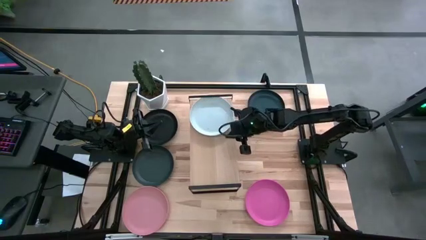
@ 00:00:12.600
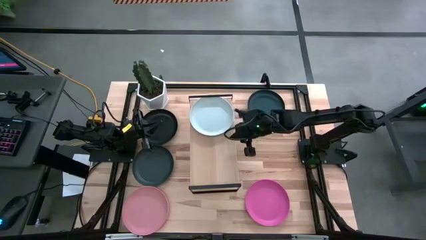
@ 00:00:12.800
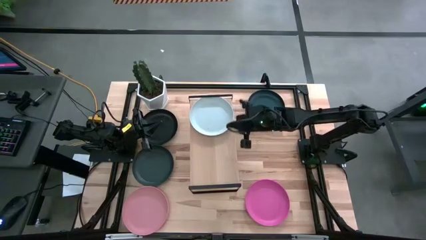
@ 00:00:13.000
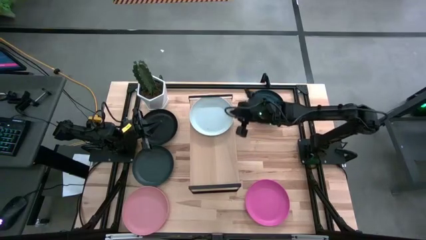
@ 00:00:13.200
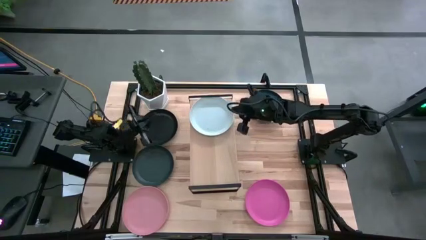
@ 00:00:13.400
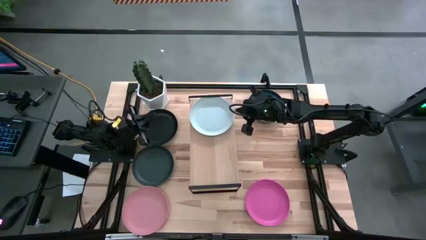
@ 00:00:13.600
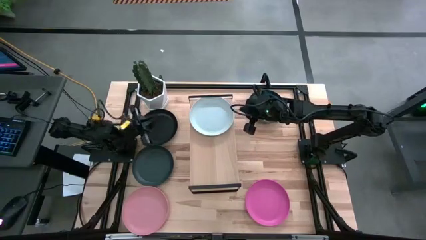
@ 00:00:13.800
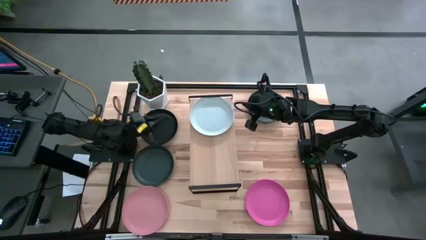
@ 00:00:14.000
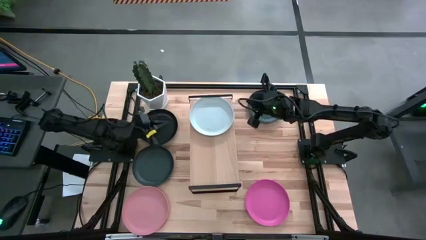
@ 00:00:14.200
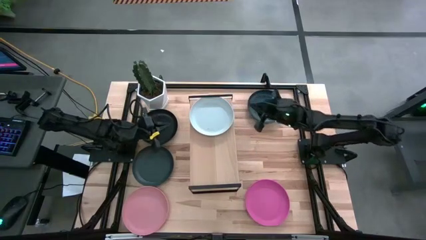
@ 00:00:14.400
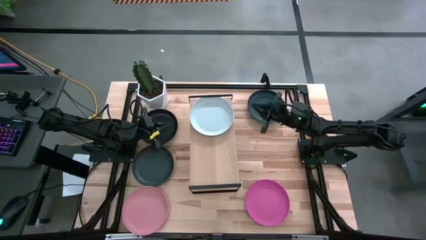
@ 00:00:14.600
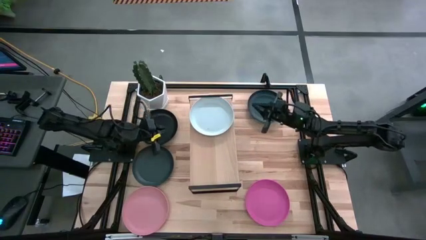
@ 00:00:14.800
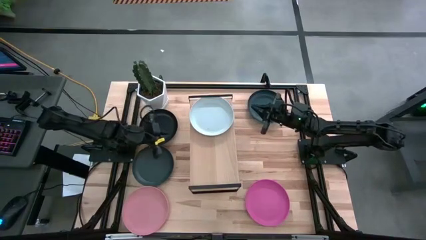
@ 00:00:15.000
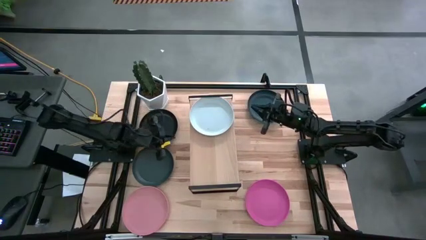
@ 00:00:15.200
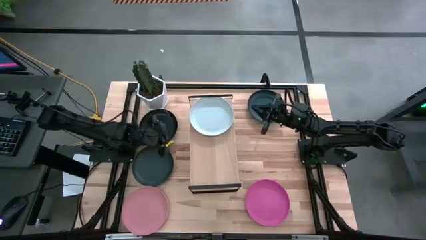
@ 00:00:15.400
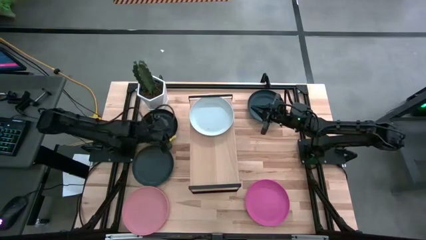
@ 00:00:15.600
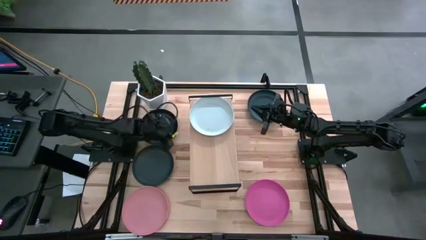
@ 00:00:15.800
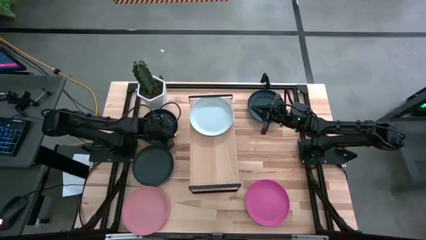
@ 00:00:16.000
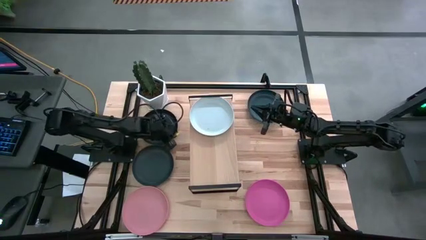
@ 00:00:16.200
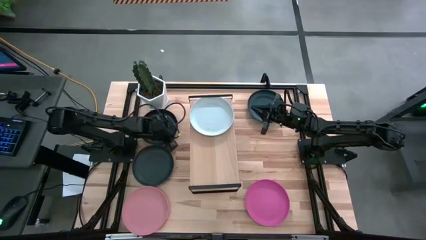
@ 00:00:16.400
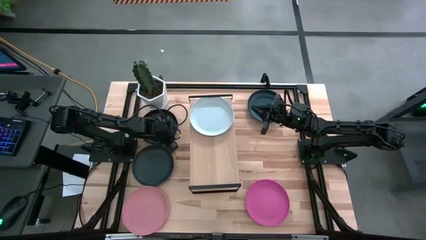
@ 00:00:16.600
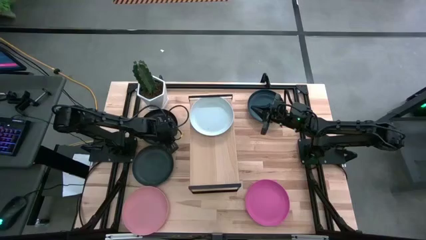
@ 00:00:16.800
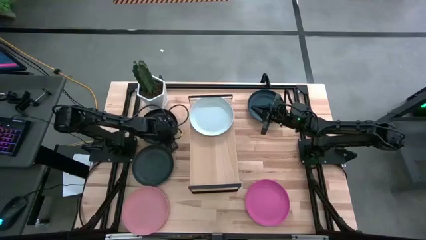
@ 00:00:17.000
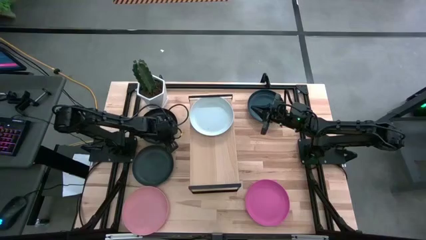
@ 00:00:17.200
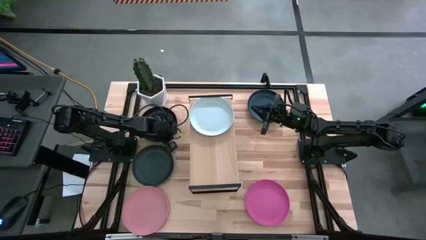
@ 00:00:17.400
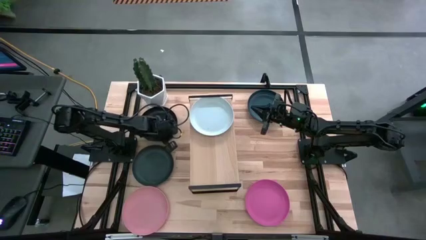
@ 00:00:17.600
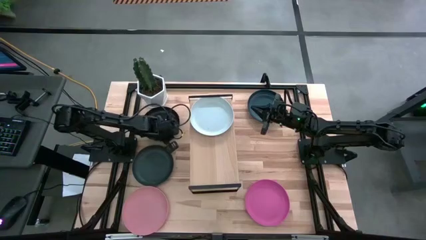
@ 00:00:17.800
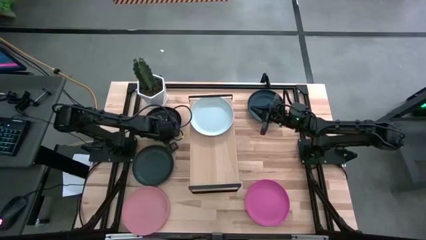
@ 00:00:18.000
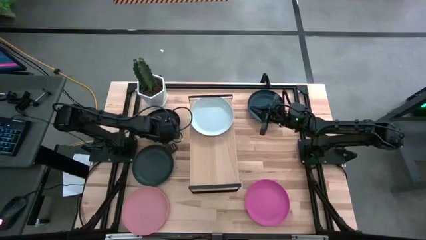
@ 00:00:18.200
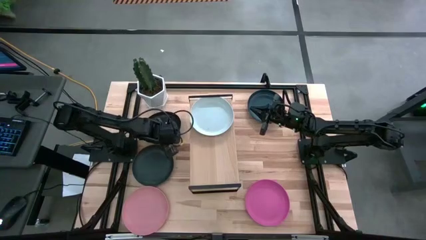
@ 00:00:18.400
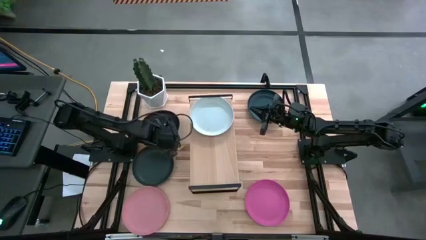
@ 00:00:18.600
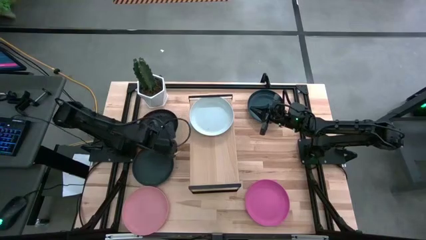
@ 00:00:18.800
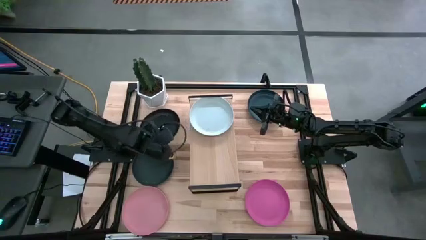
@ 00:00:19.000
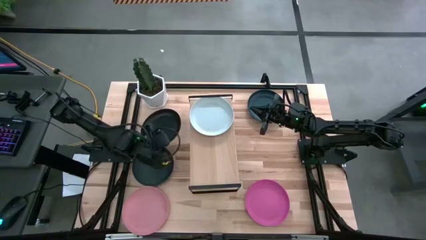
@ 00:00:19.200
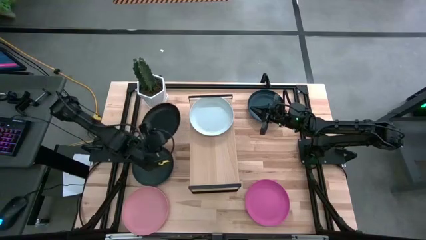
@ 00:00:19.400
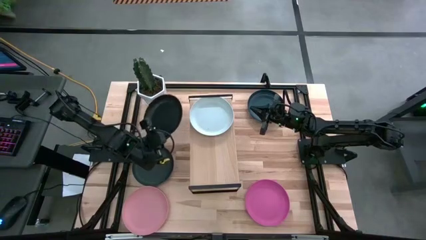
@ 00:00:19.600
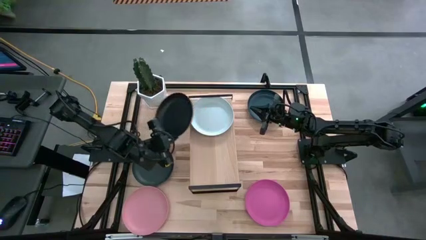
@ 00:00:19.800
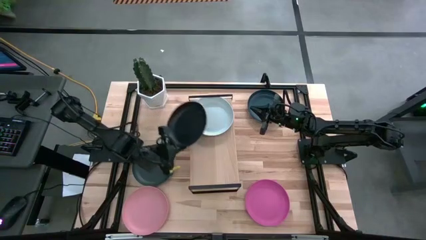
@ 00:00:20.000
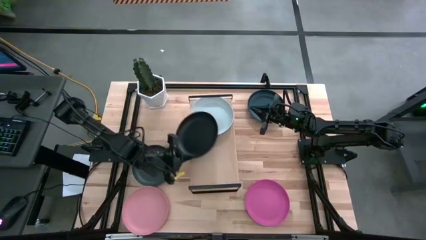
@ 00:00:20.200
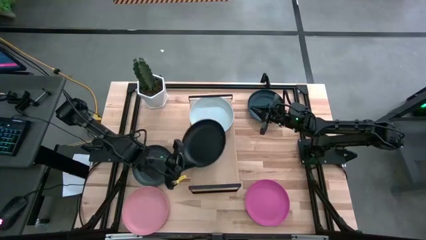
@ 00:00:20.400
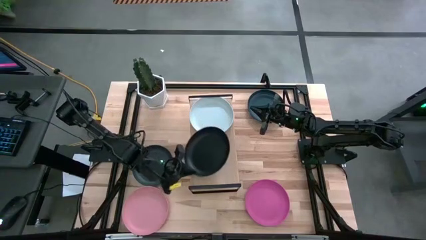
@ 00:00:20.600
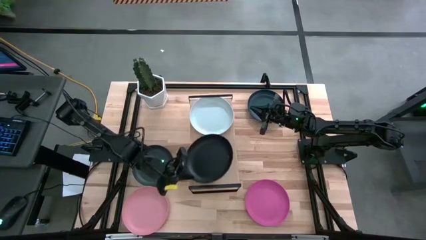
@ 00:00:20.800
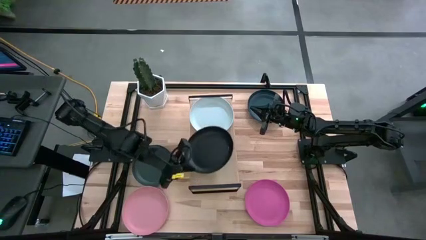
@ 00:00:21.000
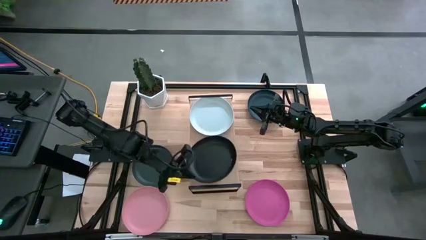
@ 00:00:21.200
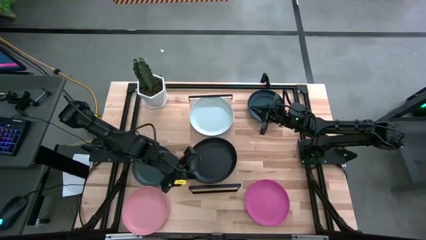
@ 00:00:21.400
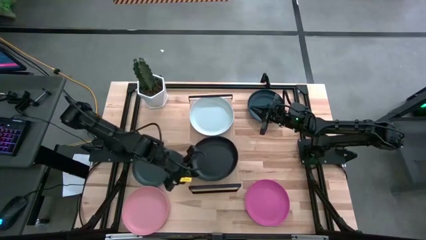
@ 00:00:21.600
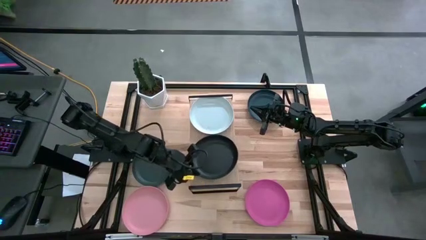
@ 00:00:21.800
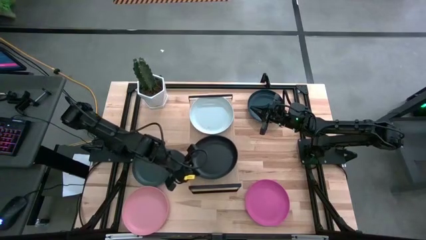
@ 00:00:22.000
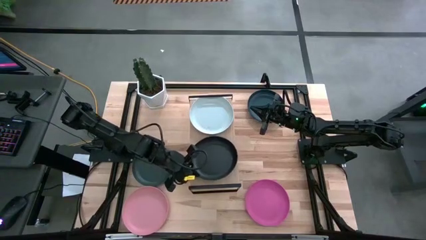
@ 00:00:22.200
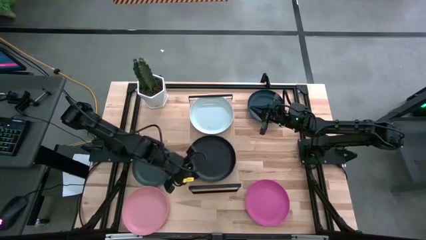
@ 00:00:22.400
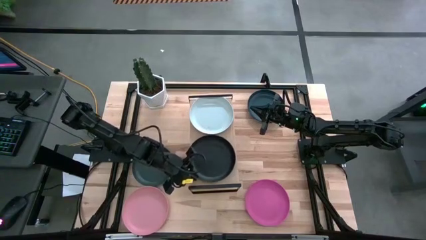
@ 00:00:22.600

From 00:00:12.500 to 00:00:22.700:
Task: Place and stack plates onto a shelf
Put the top black plate on the shelf
